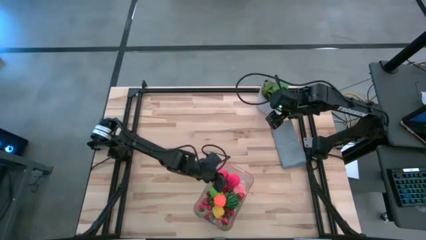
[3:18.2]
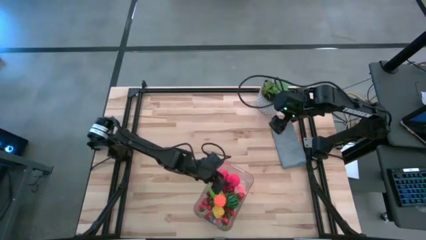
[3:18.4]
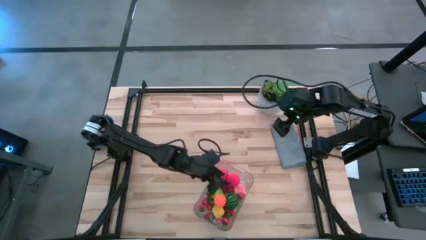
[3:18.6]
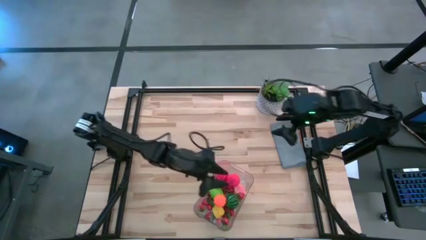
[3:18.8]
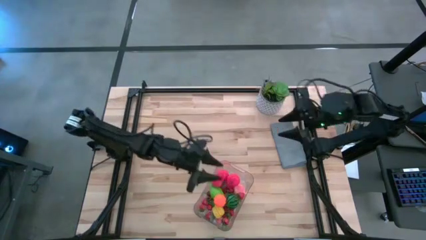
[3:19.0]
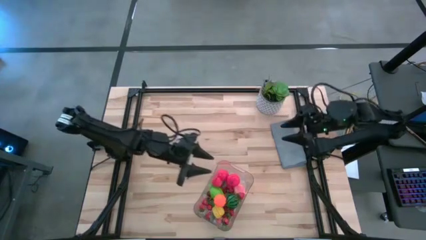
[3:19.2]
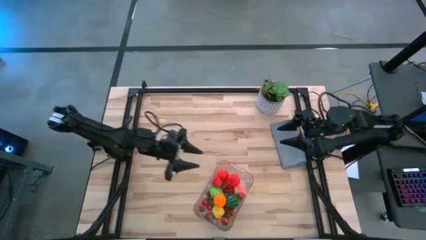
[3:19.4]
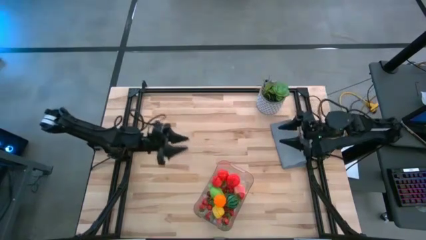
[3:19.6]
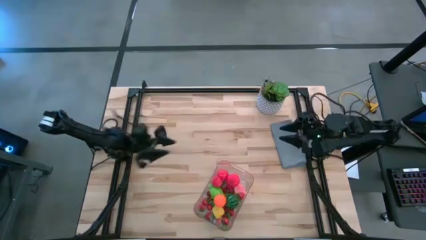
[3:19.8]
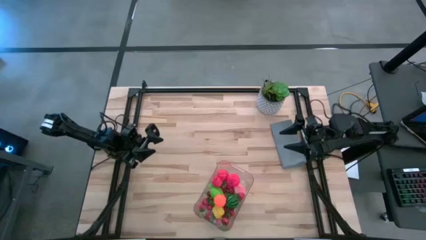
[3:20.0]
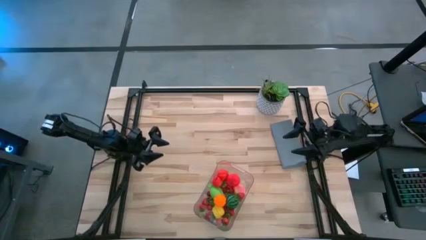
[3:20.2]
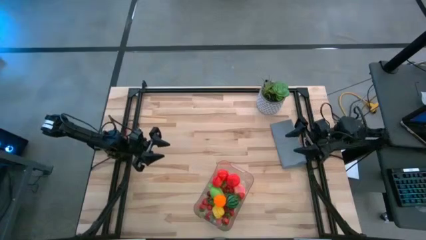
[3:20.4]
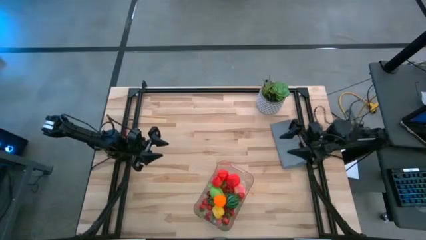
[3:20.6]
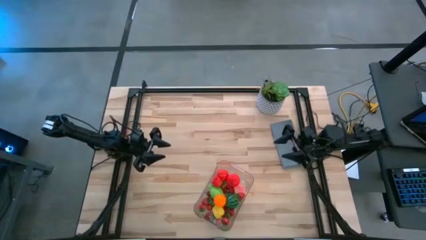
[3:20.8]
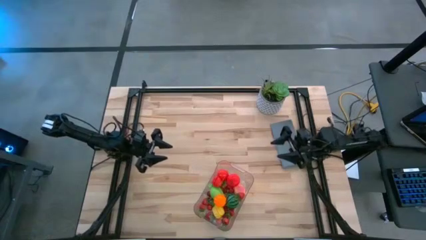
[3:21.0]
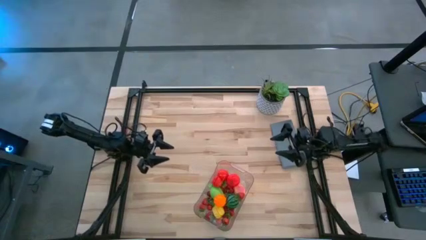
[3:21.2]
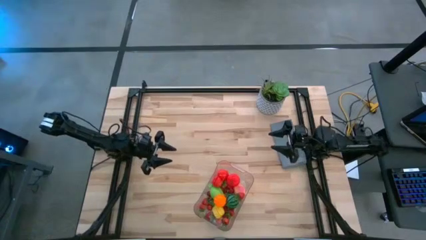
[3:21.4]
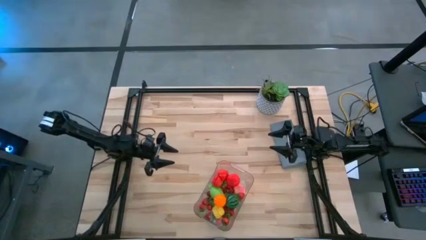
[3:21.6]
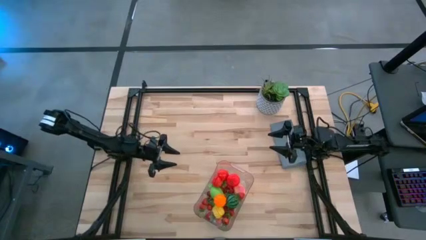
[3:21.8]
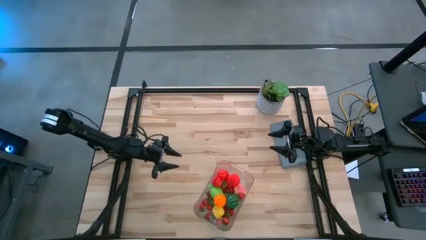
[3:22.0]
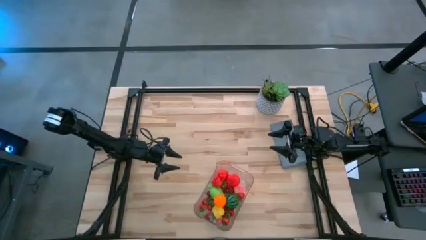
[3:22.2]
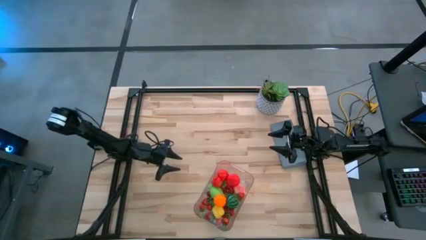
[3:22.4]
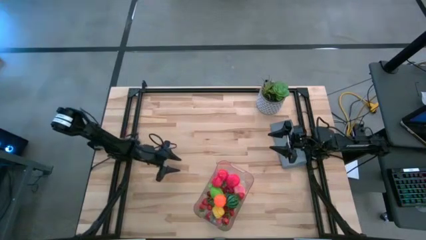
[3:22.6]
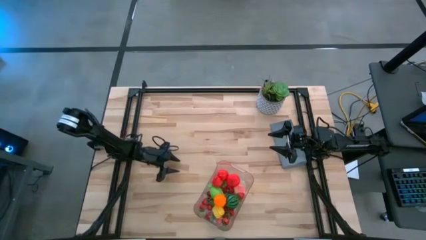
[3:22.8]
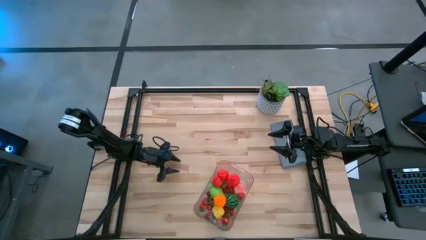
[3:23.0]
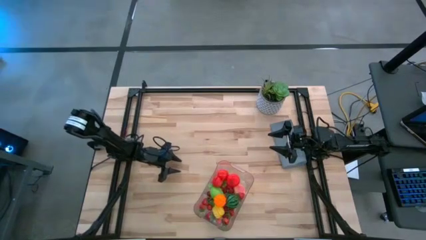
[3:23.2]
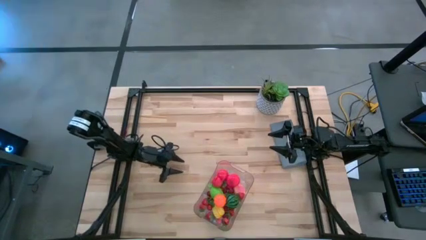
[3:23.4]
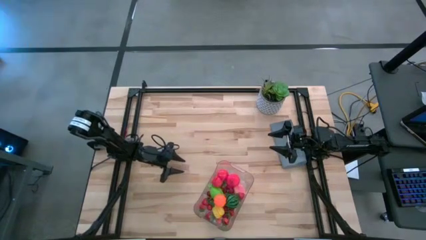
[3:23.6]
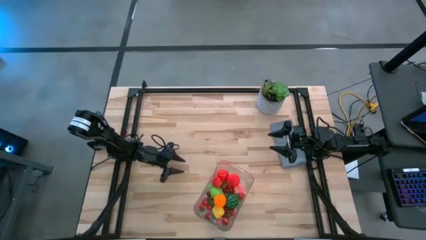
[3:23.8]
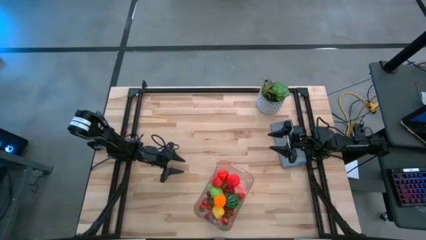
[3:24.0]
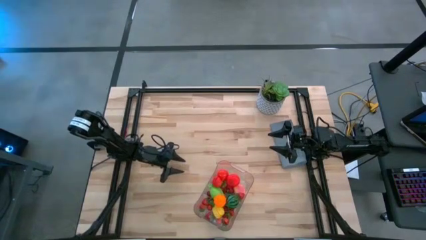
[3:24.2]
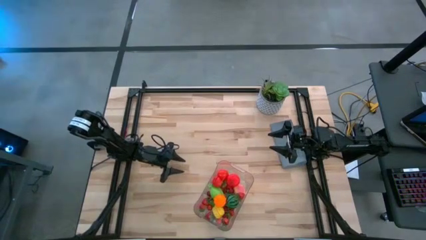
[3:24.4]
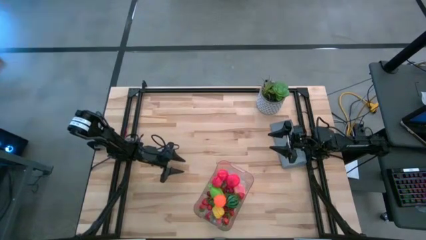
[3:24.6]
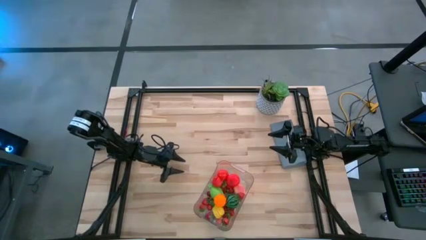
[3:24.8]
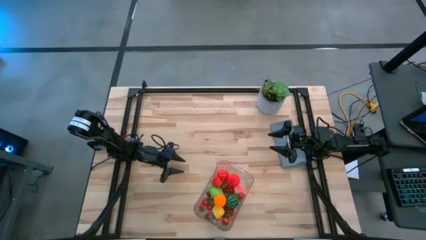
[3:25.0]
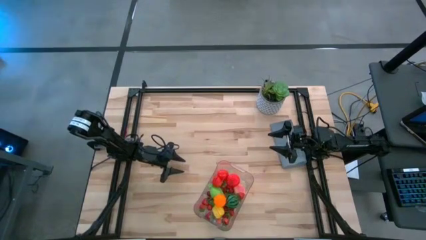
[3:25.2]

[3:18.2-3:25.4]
Task: Pick and placing Produce into tupperware
Return to Home Position

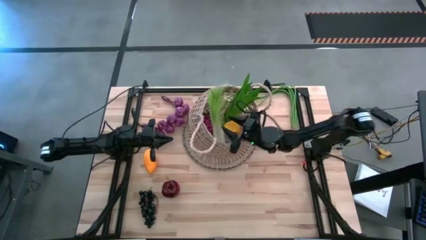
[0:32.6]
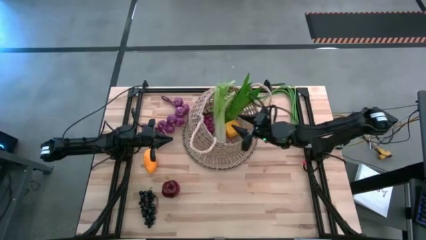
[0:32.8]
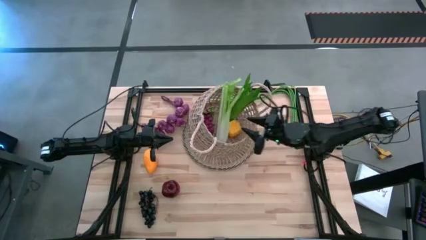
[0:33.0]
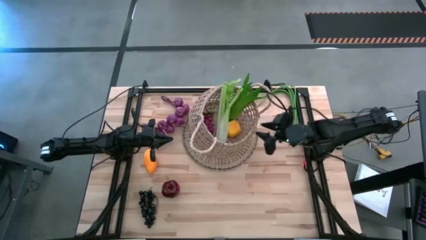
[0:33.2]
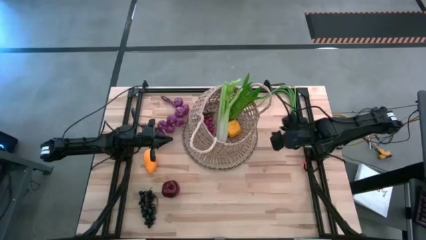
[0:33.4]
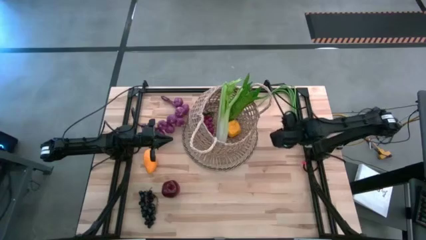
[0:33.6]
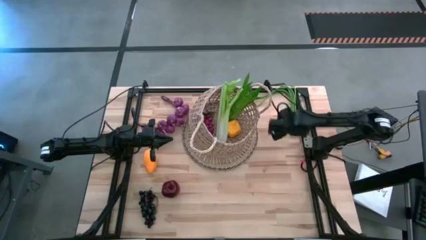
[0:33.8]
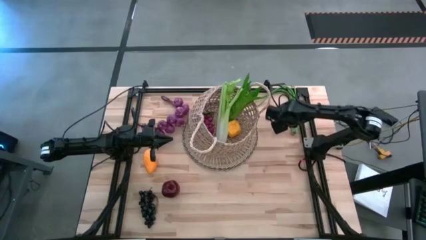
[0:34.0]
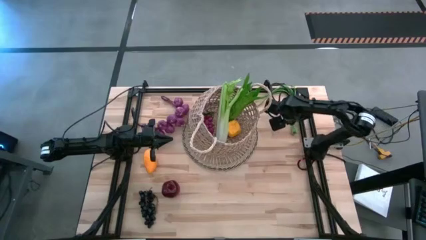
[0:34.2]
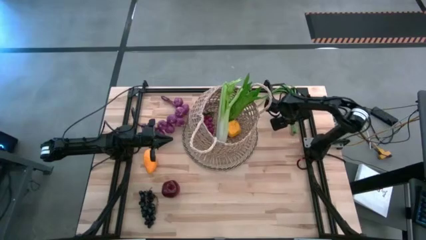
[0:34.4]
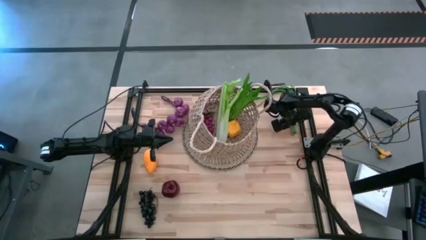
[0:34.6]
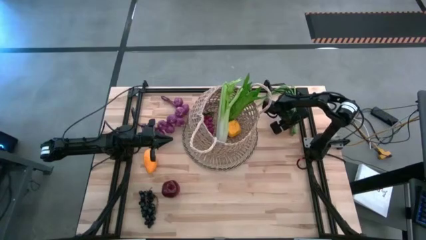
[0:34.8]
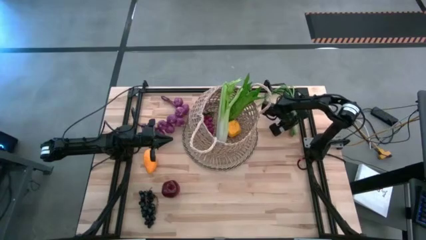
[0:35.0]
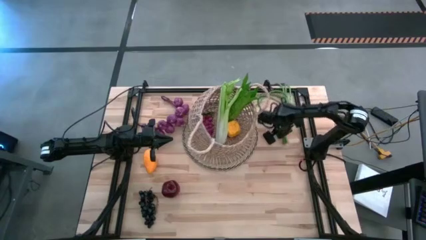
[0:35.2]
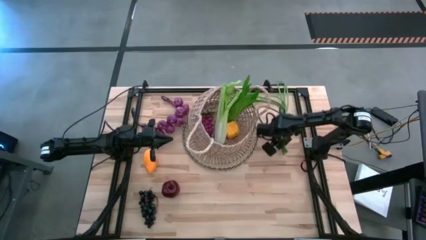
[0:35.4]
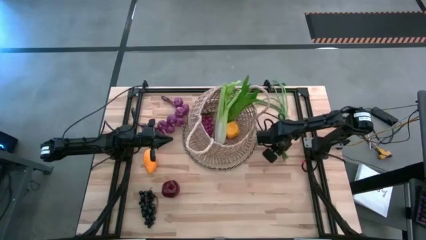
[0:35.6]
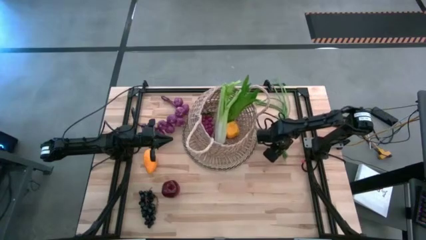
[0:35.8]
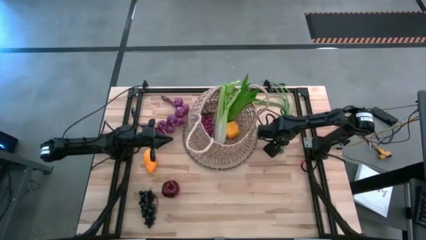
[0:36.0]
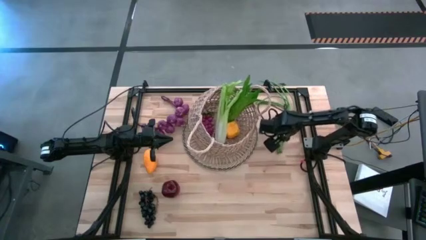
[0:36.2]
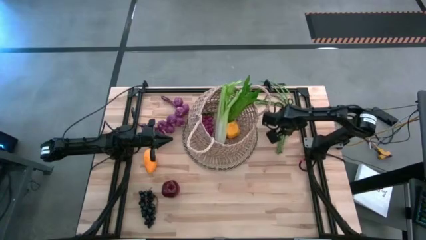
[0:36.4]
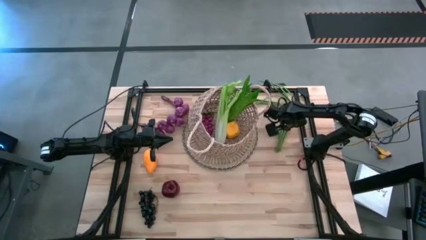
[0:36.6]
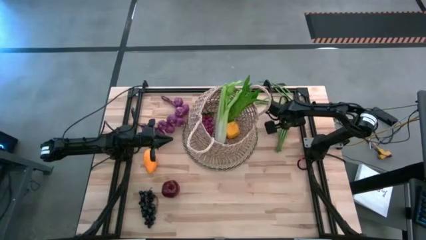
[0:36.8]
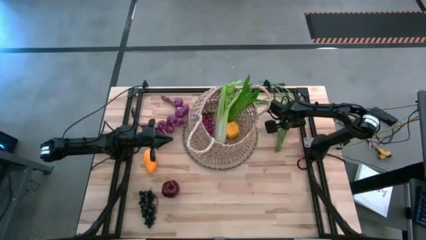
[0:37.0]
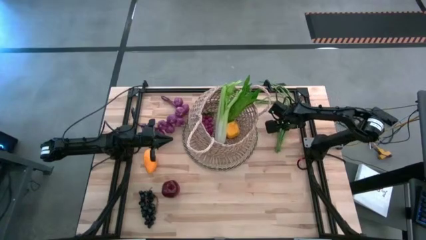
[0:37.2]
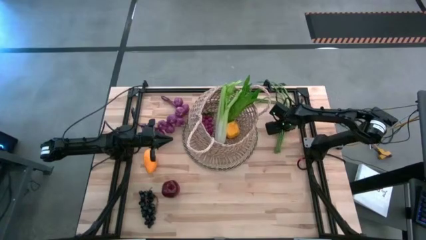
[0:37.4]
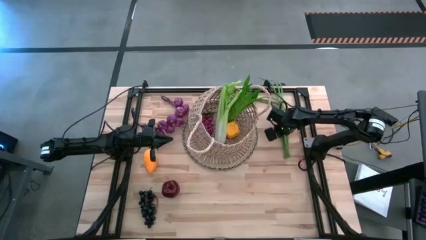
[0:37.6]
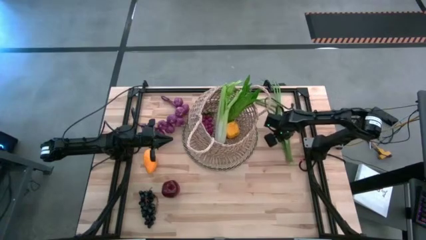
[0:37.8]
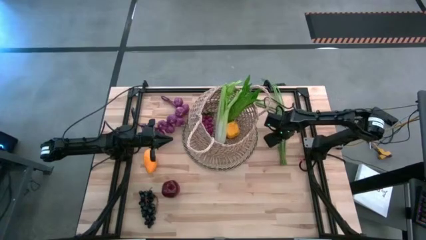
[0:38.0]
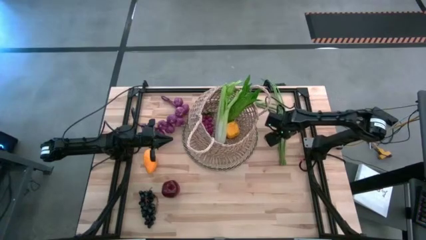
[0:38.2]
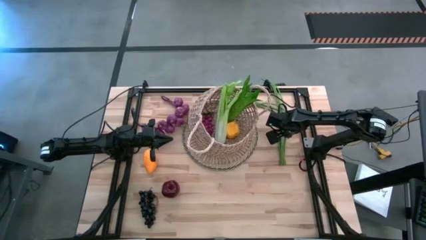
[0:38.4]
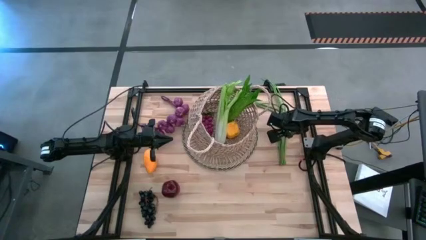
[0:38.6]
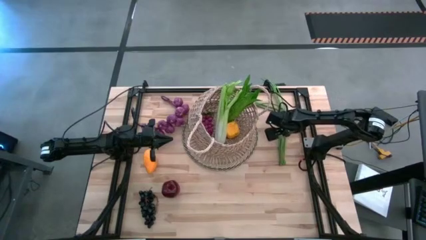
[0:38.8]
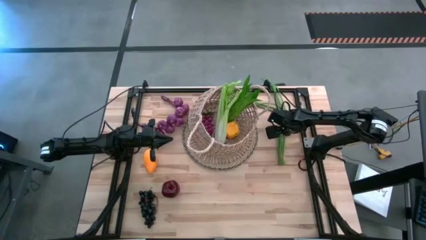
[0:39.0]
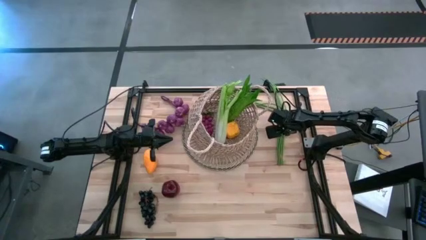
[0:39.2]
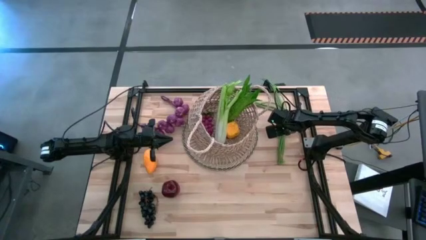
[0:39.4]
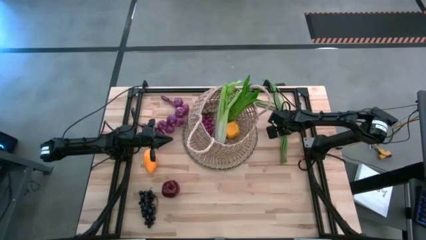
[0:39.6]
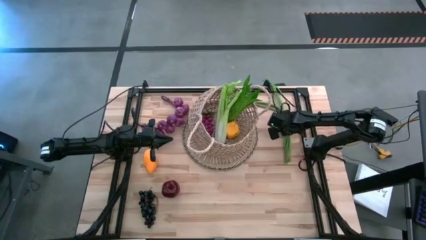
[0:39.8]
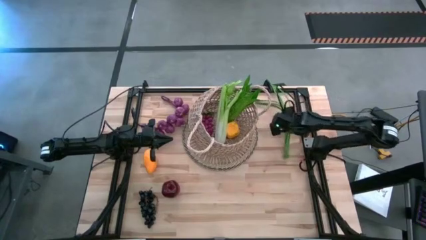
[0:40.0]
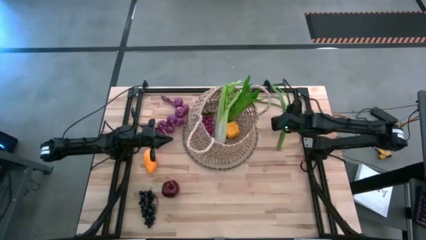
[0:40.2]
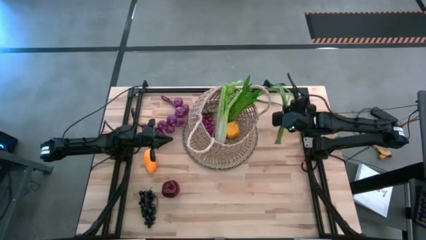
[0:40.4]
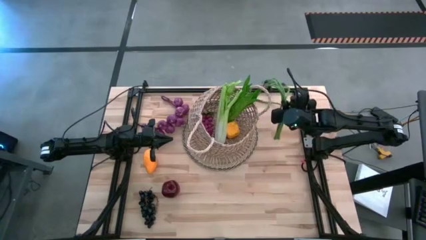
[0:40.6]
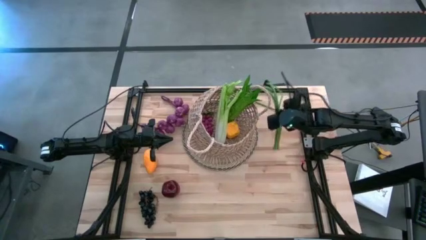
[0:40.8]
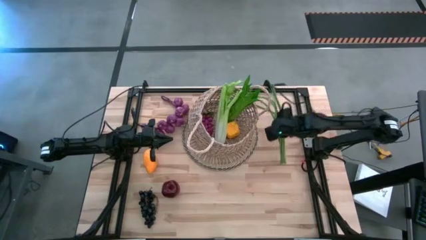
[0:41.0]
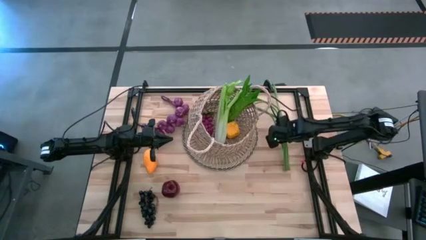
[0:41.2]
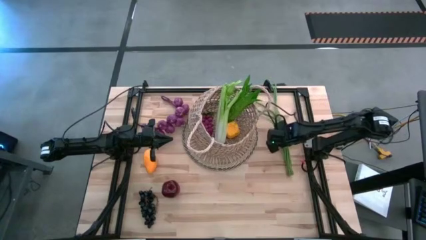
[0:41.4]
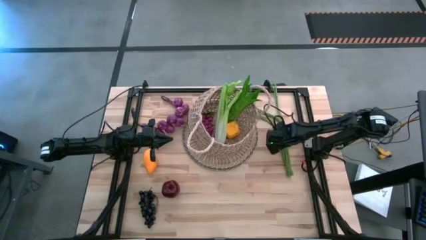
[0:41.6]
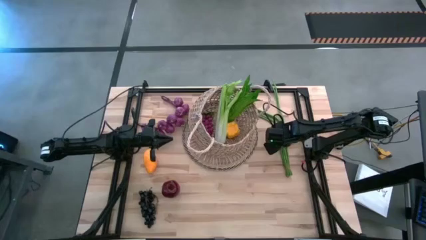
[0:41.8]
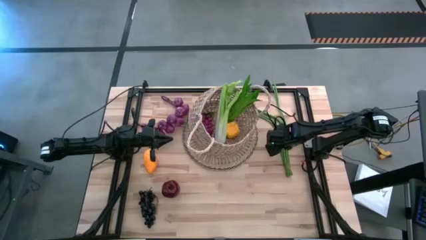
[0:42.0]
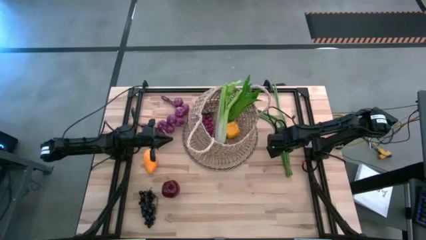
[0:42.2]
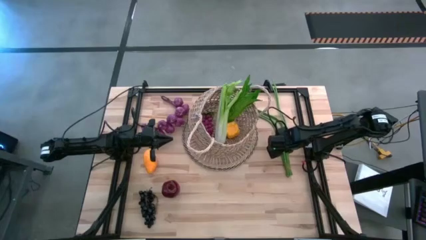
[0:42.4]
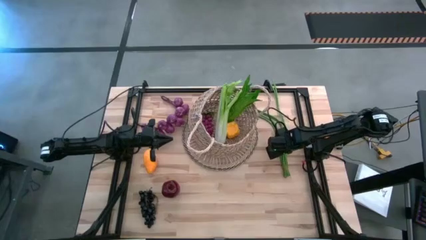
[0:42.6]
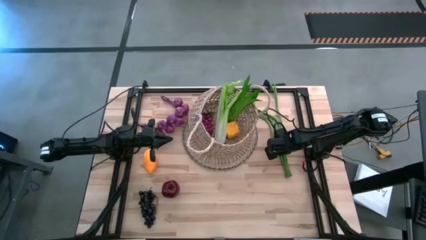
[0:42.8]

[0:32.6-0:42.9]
Task: Build produce basket
Put the string beans into the basket
